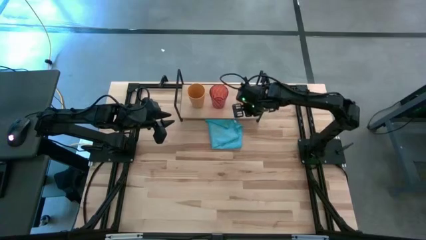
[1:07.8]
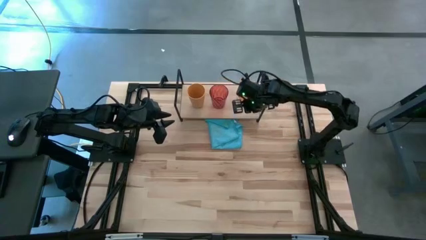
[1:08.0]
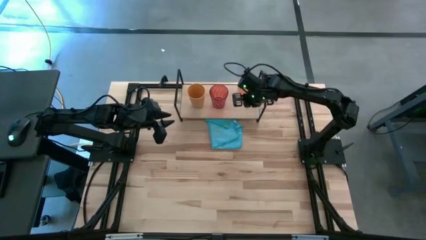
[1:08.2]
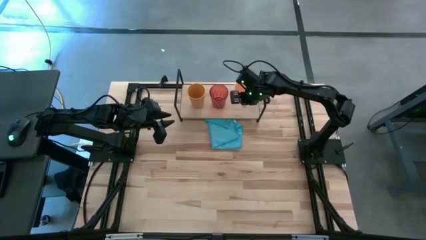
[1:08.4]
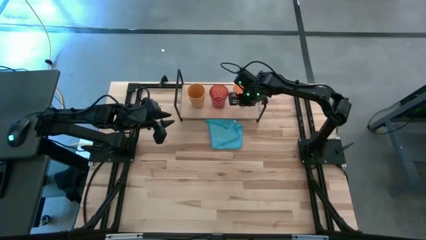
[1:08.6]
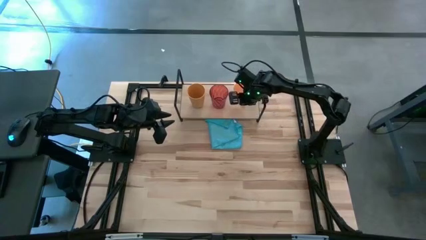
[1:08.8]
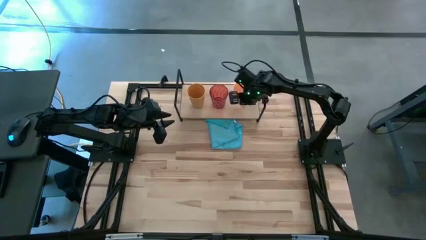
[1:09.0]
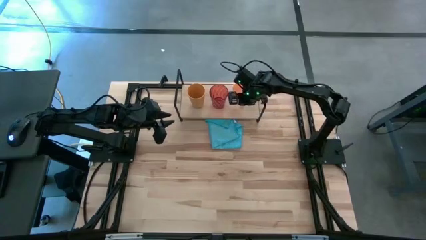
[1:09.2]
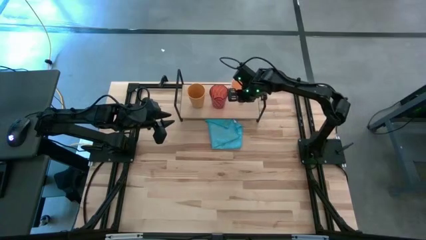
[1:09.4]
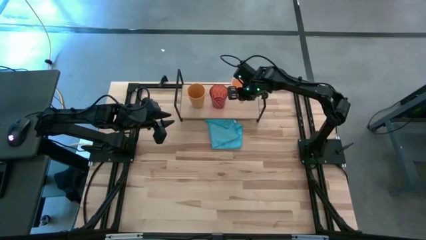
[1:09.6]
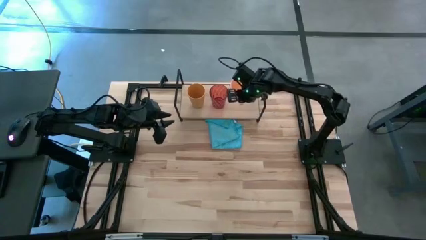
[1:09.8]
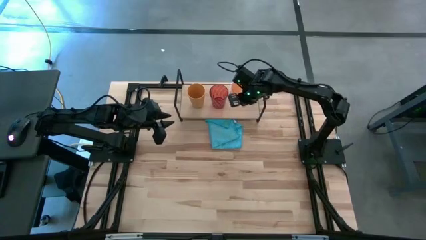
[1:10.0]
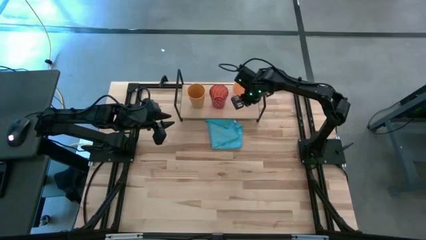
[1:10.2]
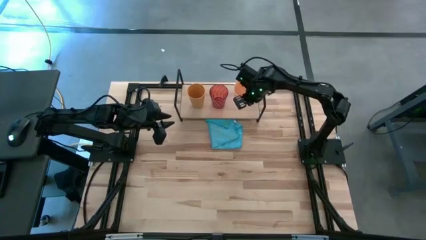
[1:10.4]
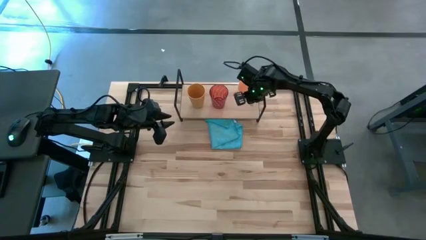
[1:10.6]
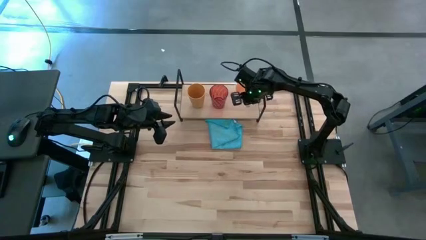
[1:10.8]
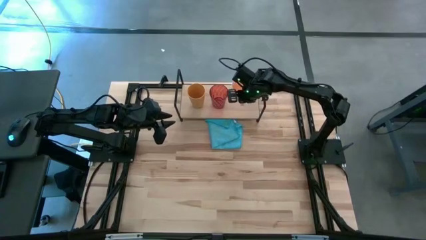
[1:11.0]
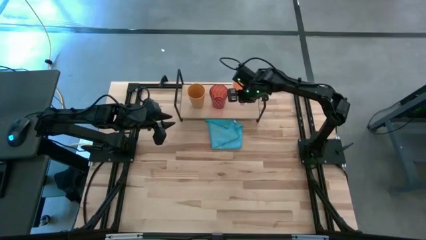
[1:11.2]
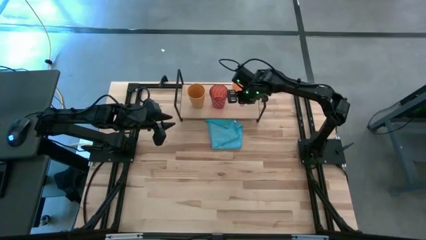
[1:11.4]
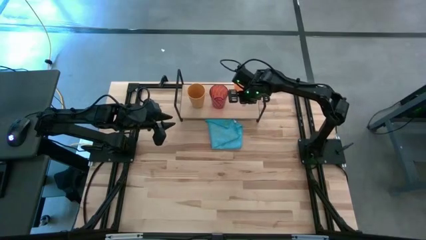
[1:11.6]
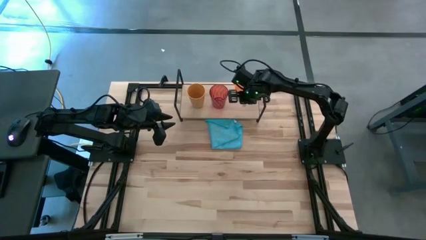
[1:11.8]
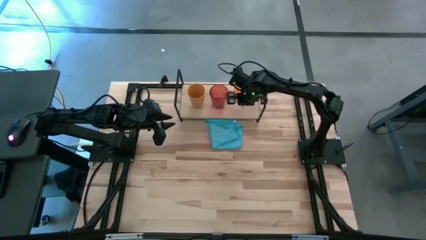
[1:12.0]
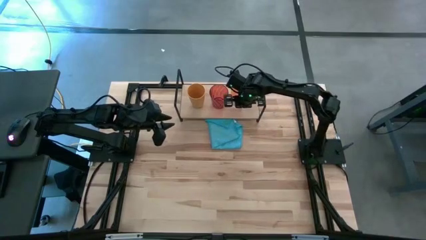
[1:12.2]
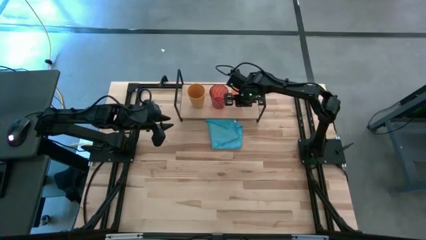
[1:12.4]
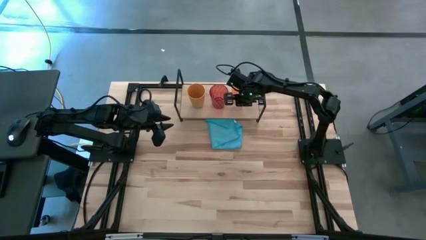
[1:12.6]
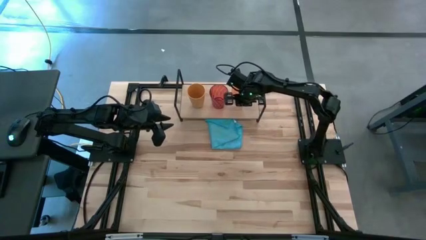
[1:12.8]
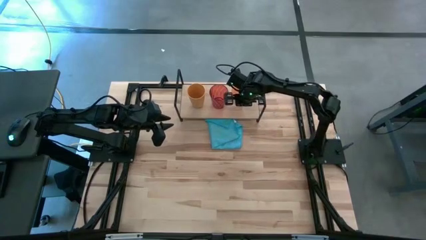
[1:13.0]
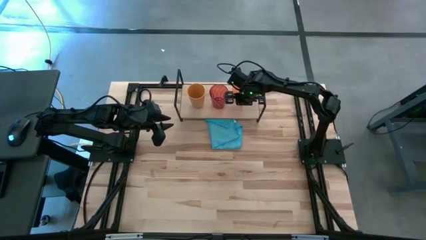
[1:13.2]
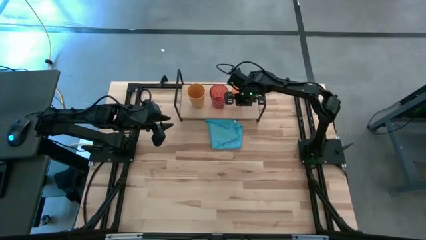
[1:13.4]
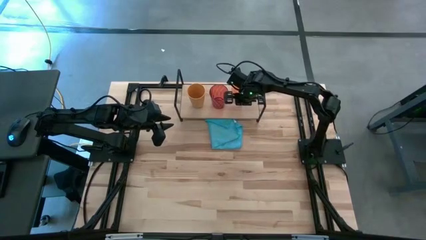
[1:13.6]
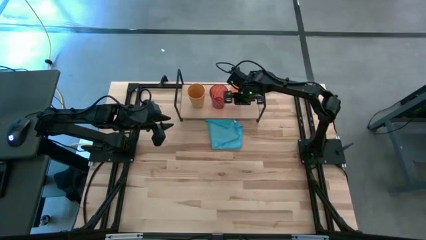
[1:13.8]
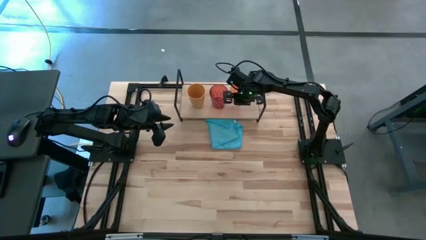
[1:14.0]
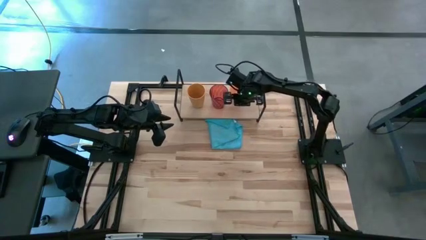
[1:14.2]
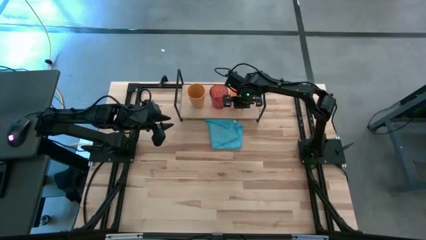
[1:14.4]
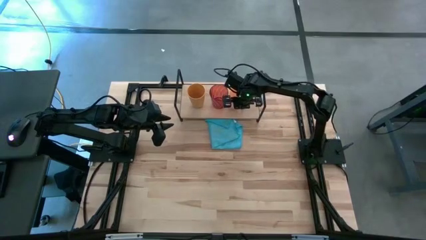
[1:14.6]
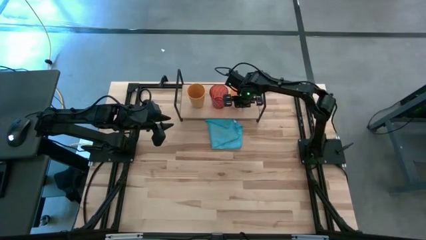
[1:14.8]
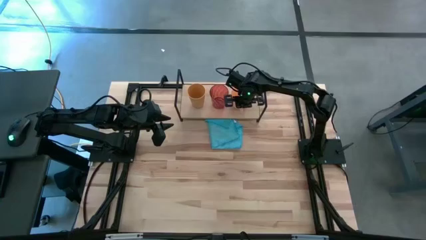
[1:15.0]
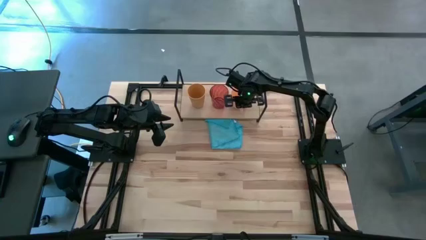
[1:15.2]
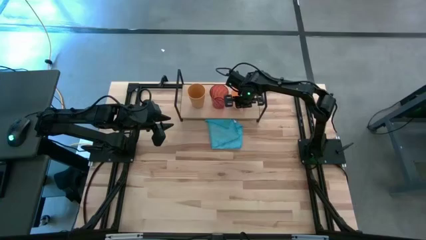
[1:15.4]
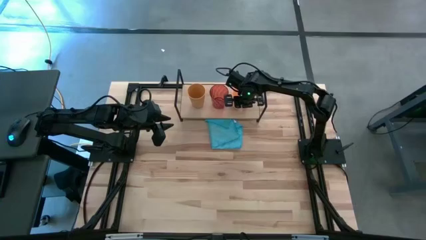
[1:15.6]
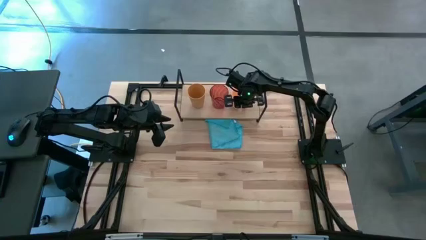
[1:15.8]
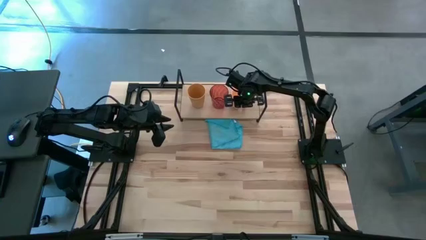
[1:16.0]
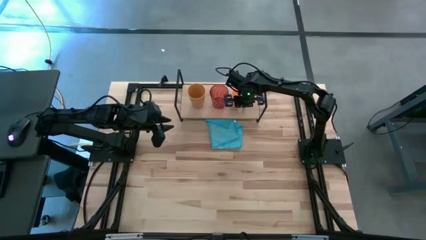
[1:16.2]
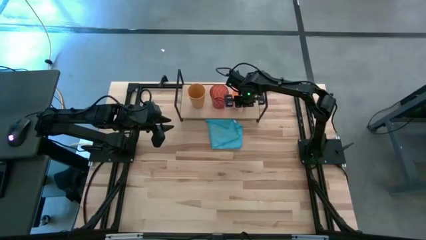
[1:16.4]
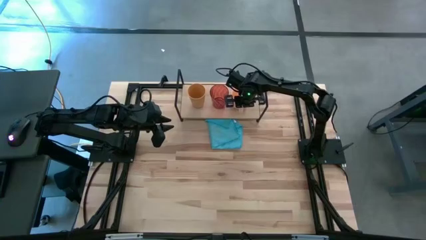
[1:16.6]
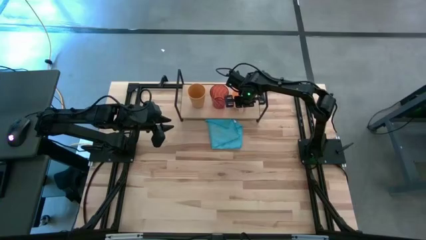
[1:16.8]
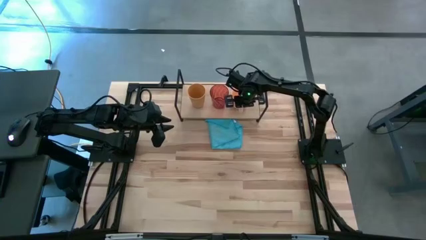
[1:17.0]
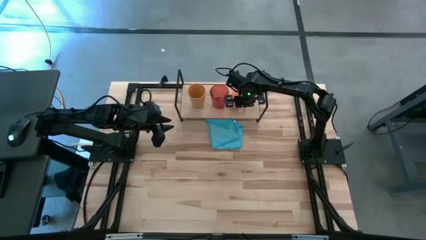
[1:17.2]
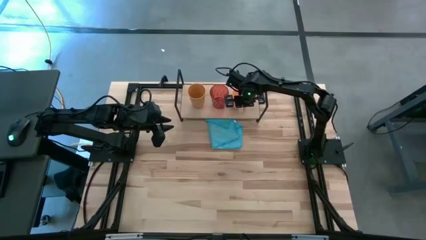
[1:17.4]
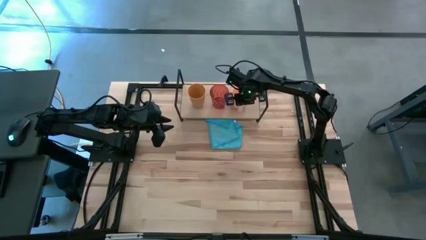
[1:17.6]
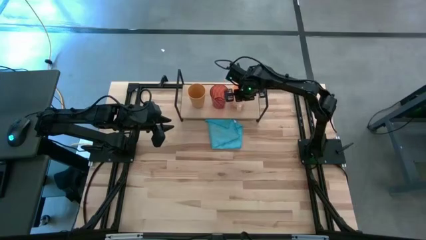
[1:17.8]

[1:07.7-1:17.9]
Task: Stack small to large cups/mugs on shelf
Put the light orange mug on the shelf

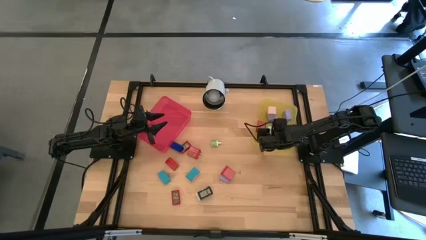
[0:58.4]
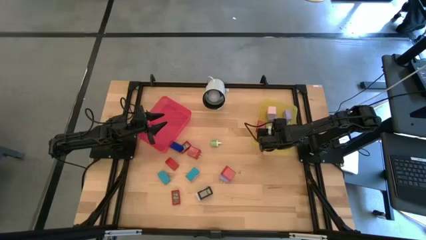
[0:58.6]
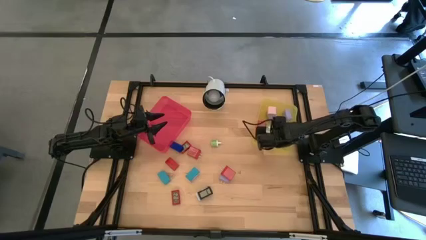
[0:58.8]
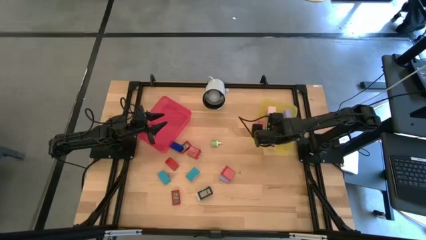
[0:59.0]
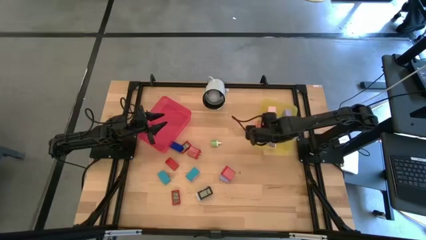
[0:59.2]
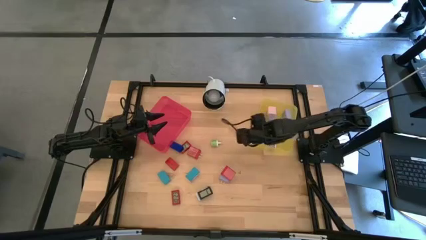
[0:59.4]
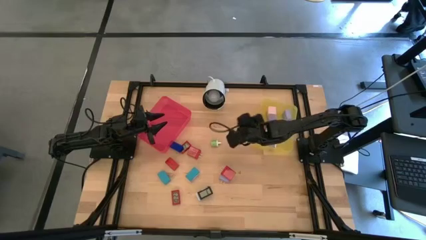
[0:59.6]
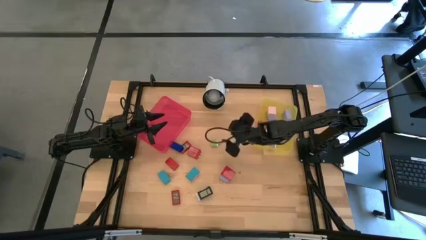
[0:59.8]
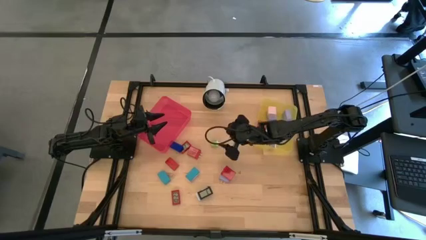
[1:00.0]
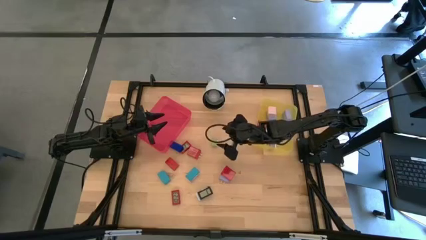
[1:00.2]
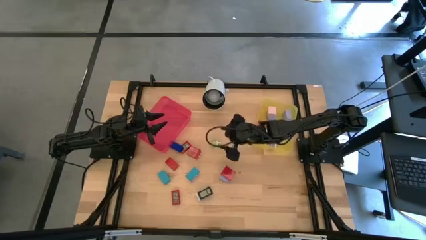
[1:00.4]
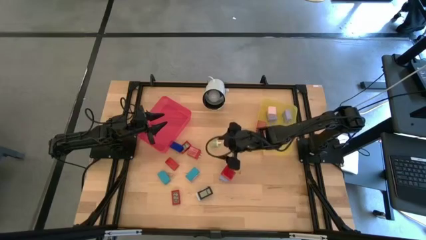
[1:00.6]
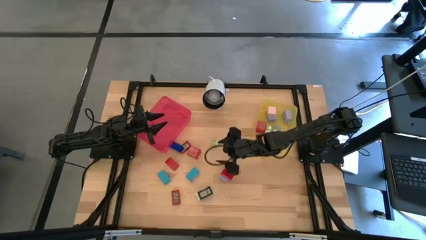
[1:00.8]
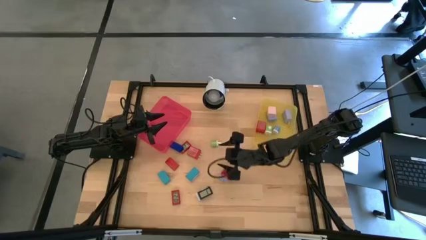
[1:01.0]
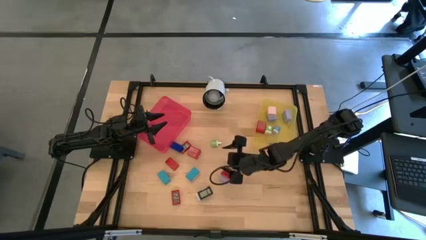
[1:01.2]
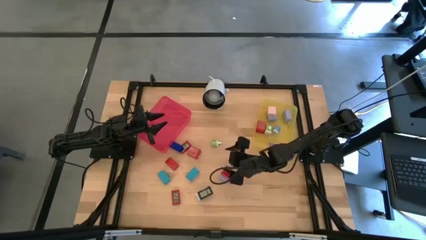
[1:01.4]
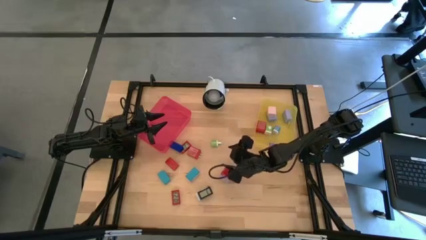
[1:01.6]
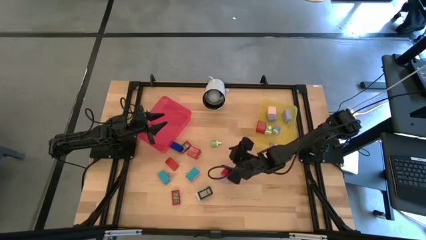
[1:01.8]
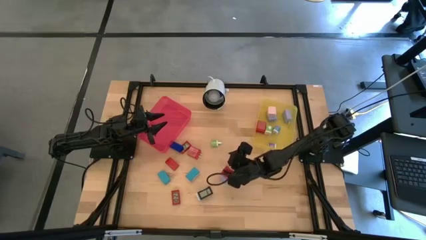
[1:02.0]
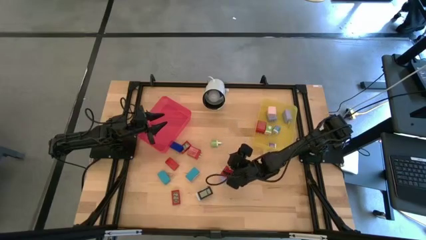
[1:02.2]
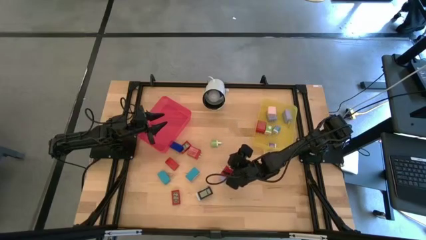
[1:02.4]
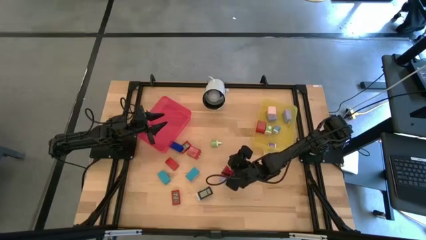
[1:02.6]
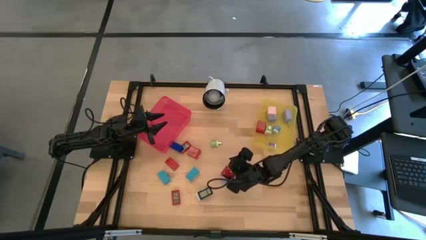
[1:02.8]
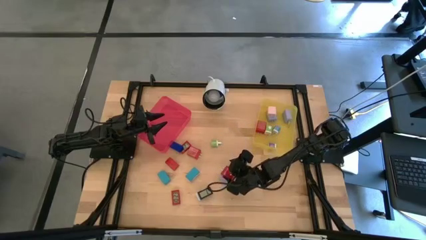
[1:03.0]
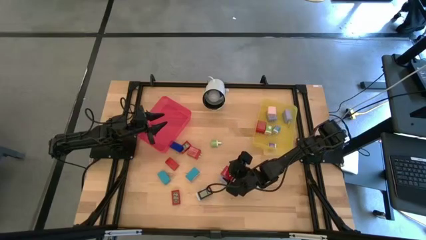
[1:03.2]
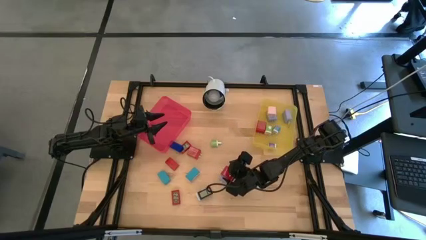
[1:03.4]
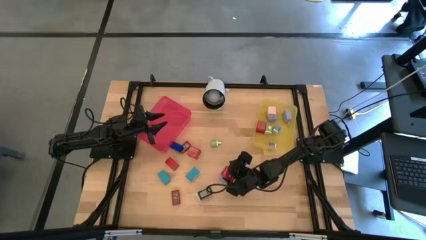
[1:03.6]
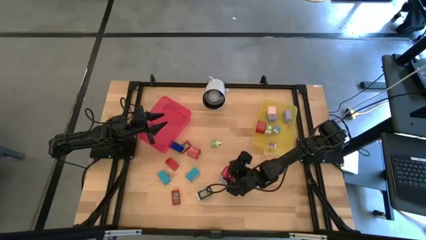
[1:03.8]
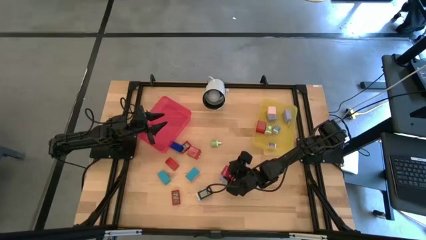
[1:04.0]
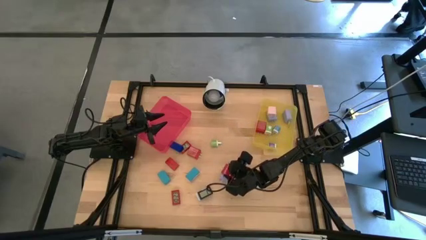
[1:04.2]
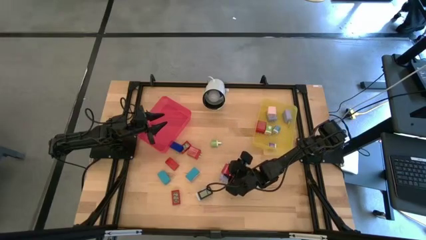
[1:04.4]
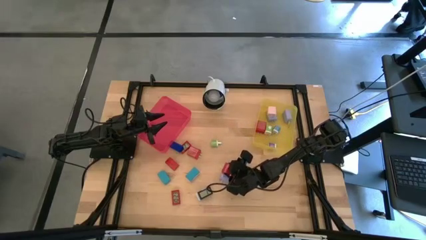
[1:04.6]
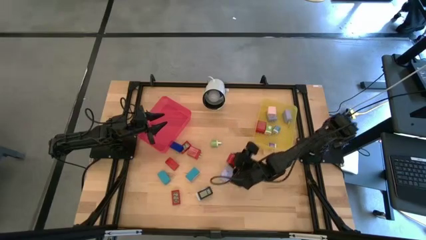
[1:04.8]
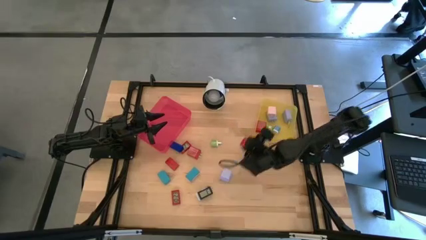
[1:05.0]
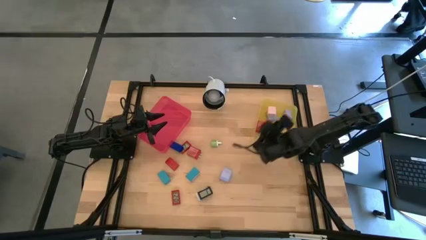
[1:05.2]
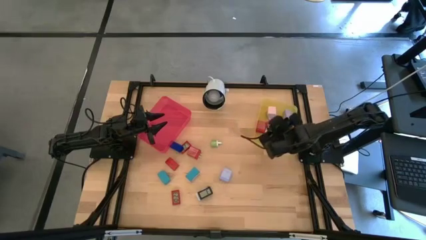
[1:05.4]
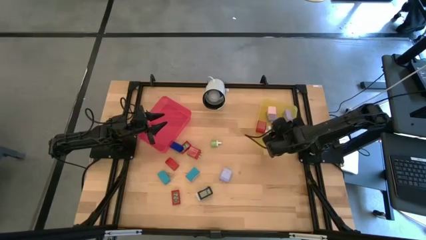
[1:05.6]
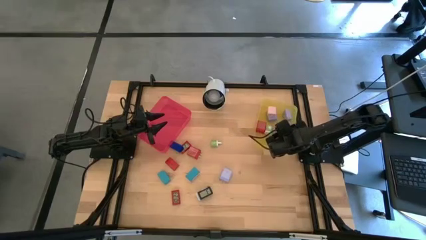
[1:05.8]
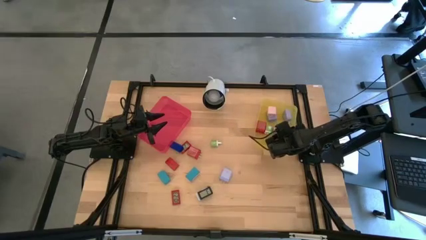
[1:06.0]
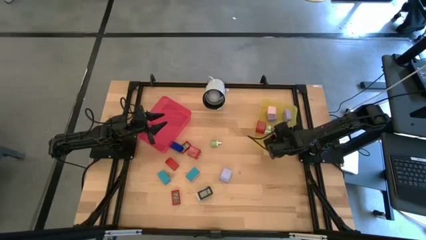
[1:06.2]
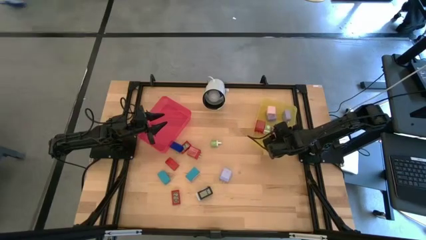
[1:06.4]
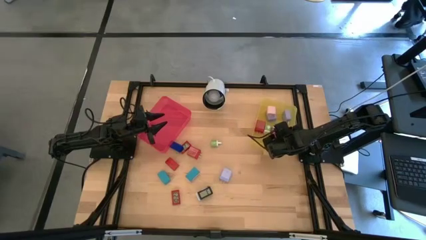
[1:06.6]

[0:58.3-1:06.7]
Task: Pick & Place Office items
Put the right red charger adapter into the yellow bin
